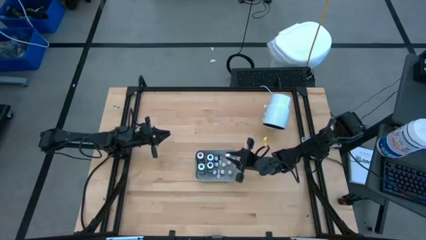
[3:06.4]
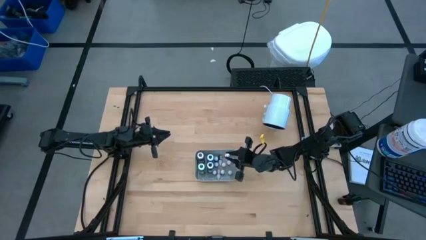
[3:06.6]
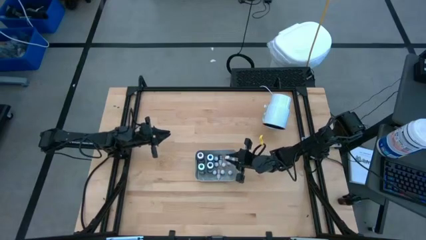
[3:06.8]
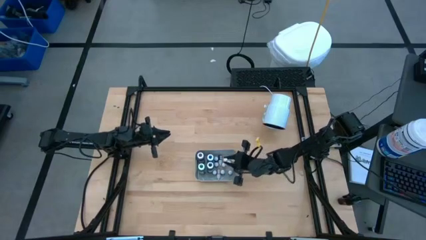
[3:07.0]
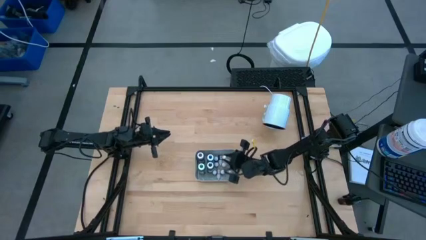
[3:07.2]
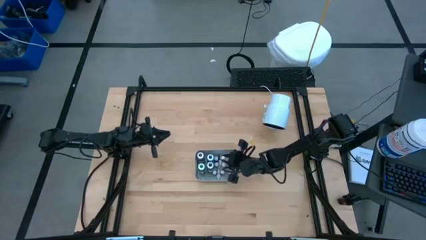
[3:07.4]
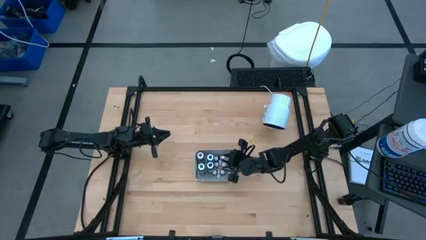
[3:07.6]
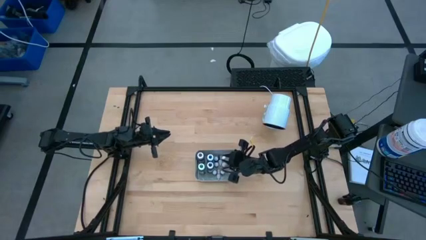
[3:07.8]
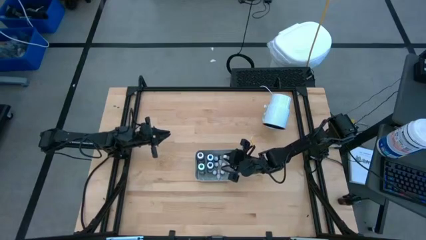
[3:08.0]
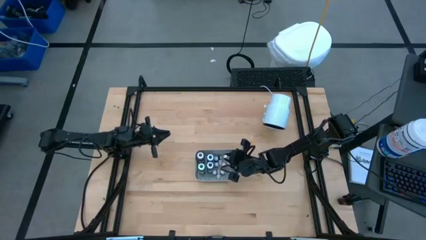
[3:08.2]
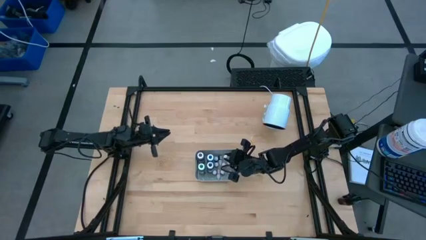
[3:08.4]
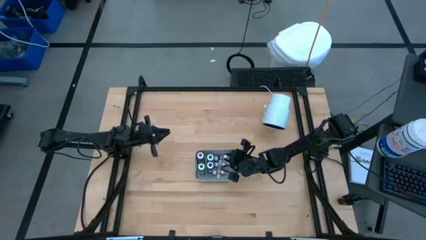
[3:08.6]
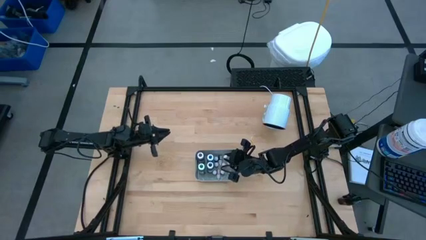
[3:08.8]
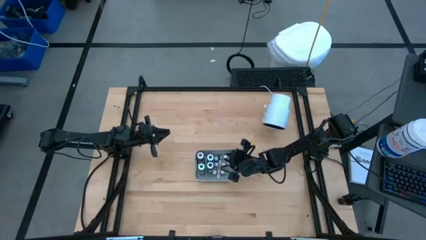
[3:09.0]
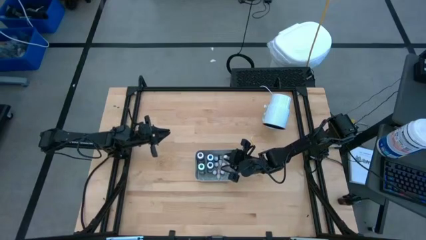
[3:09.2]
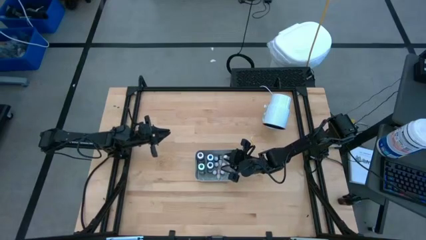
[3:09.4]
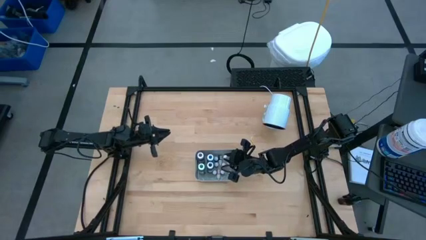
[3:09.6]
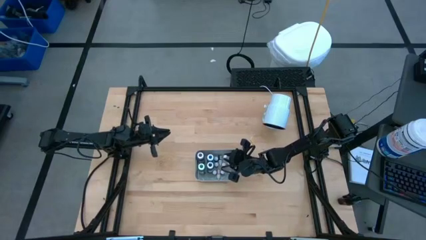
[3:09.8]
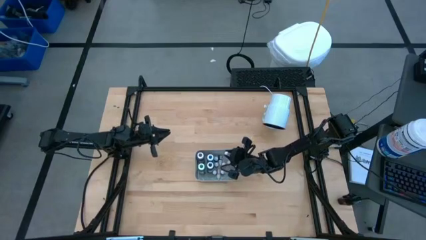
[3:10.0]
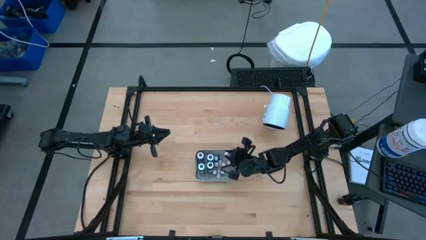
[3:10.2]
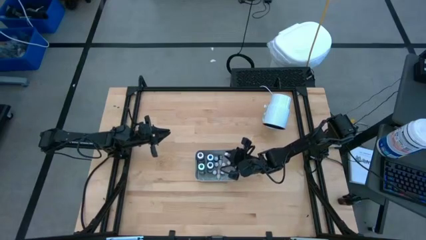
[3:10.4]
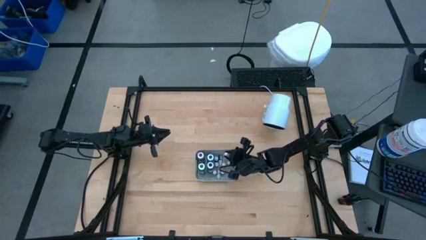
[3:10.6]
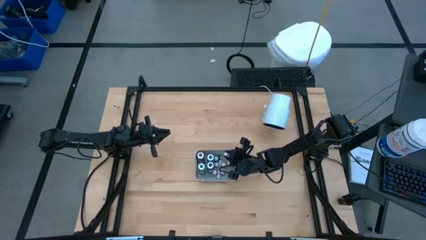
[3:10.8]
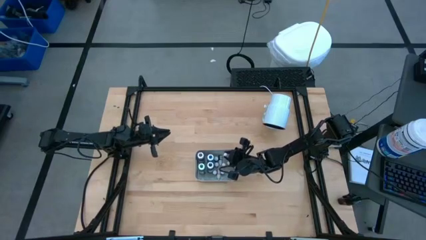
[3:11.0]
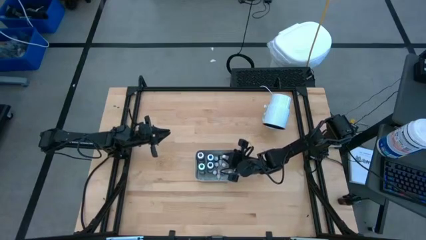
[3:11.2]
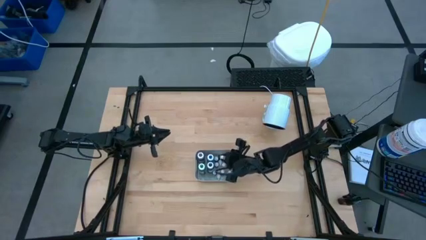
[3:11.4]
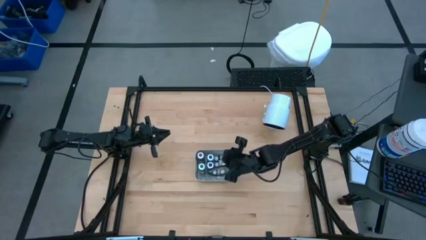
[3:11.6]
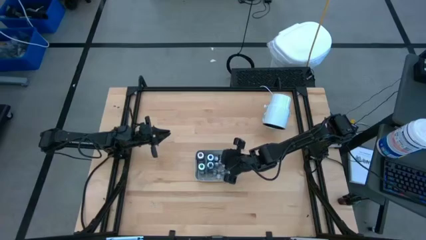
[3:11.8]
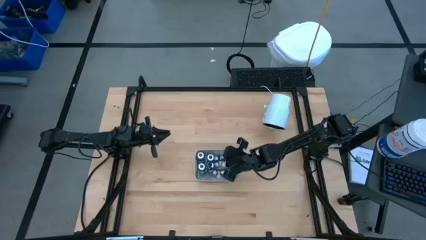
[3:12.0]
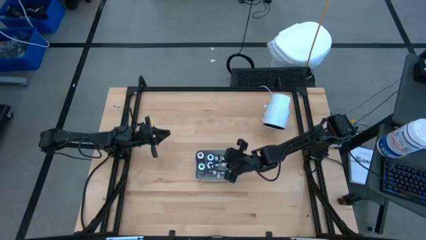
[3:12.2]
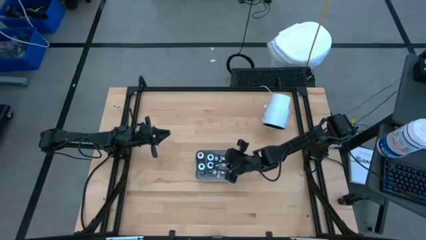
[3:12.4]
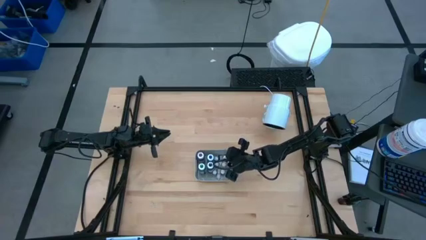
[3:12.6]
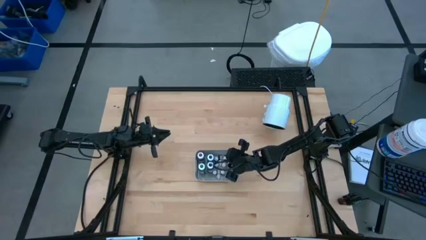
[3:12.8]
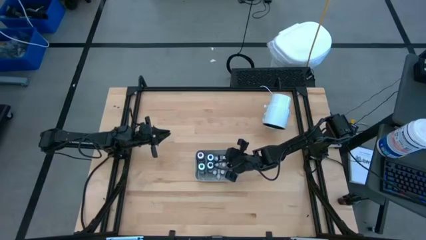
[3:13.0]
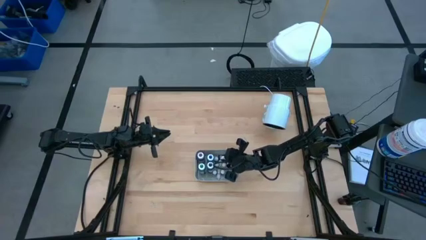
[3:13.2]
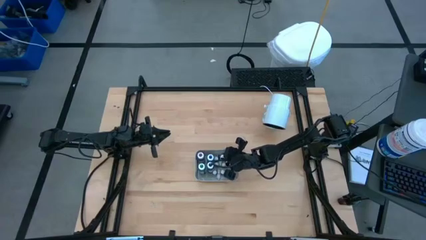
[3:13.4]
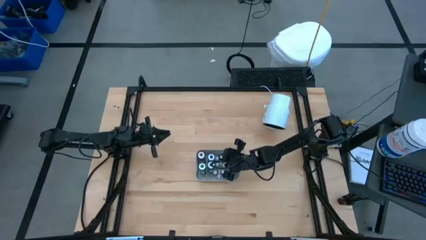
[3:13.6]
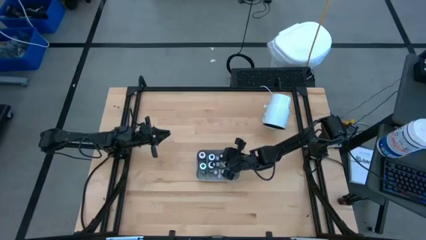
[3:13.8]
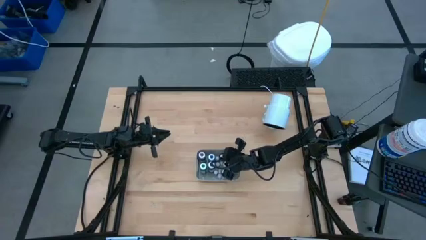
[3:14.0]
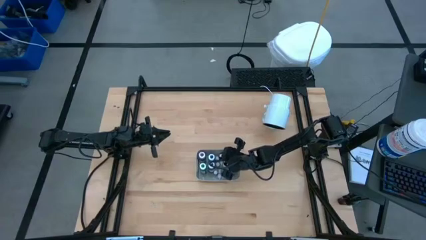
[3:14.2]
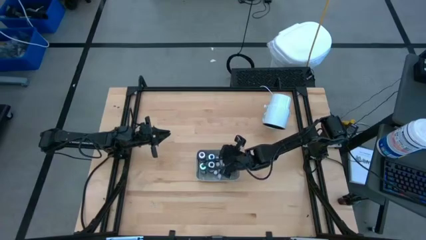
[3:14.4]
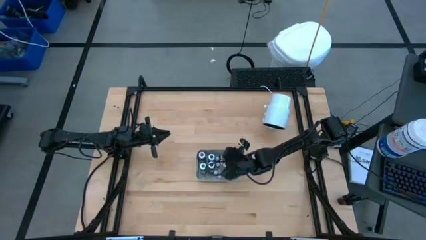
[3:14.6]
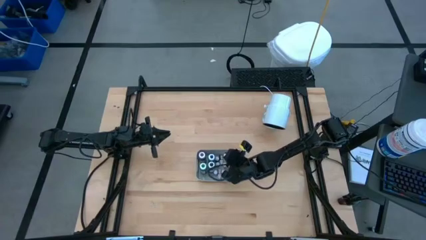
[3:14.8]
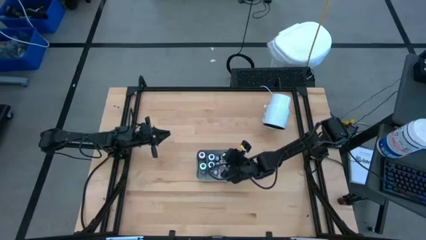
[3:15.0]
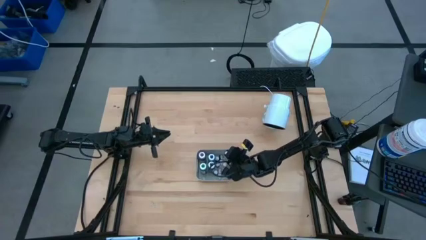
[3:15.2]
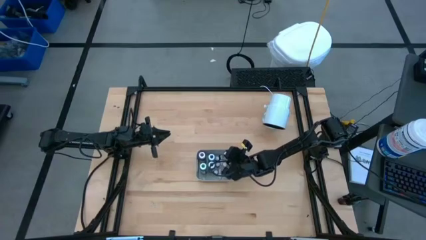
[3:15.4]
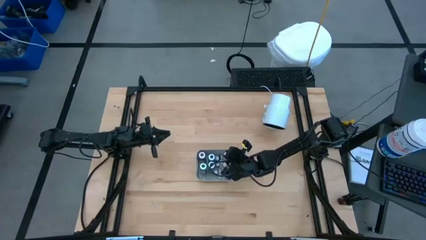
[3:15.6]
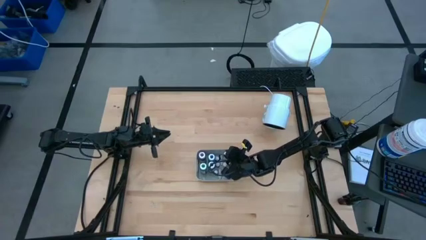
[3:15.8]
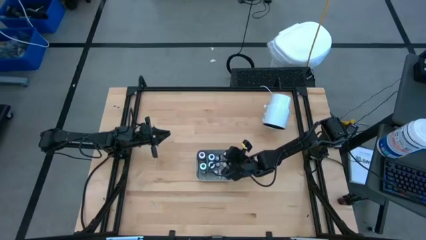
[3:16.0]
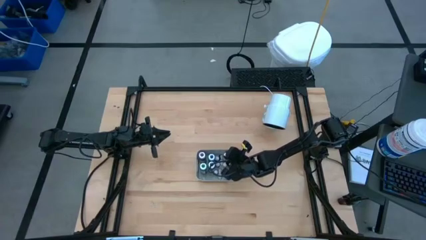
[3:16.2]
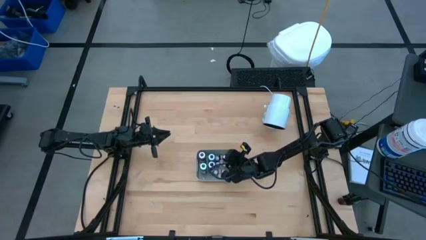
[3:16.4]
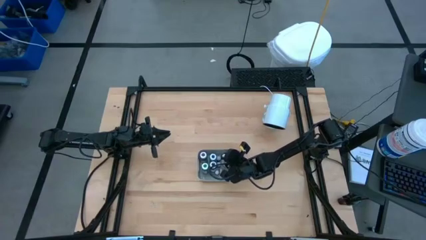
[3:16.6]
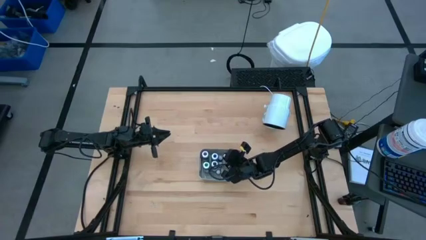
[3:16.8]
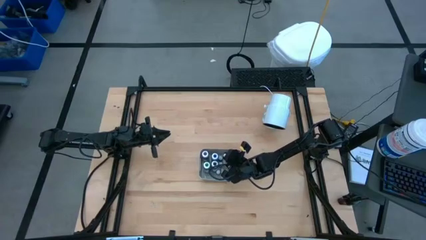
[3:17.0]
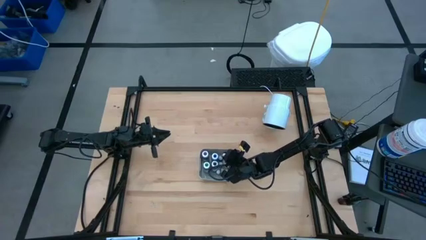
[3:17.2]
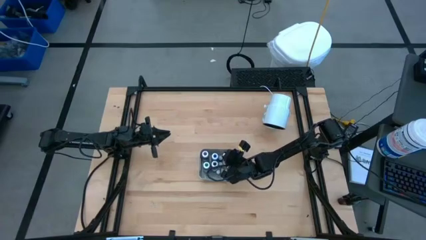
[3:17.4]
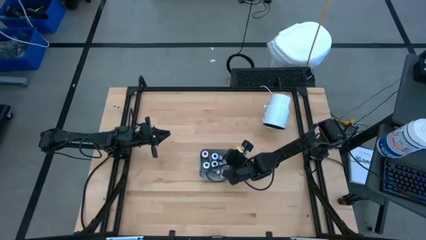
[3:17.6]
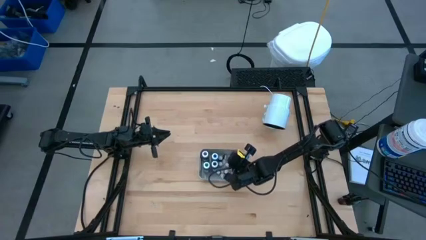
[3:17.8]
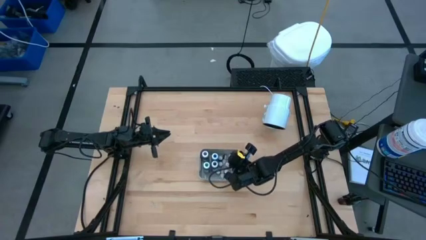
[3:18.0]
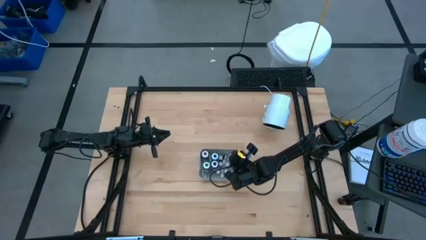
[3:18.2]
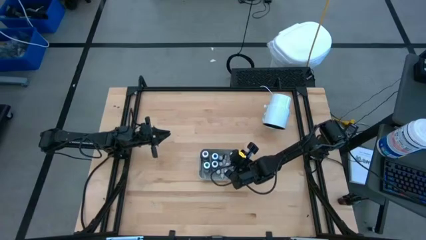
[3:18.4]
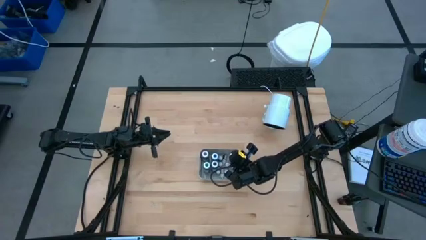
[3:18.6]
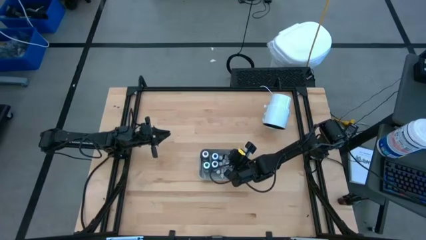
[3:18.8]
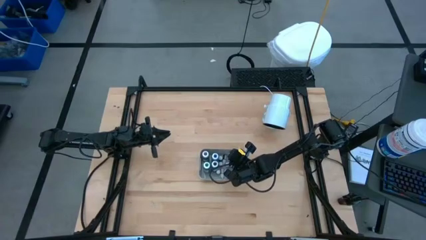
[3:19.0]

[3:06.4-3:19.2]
Task: Pick & Place food coloring
Put the small orange food coloring bottle into the gray bin

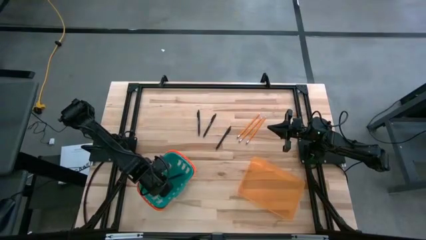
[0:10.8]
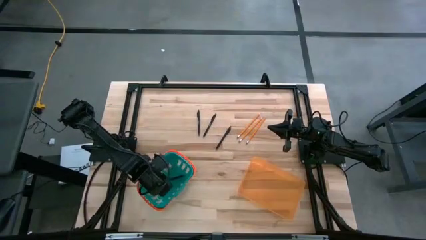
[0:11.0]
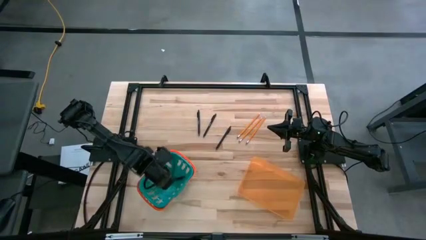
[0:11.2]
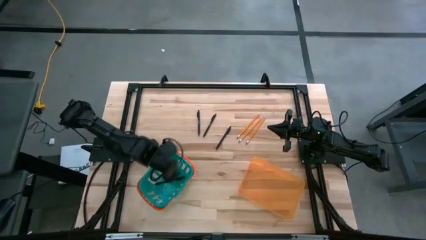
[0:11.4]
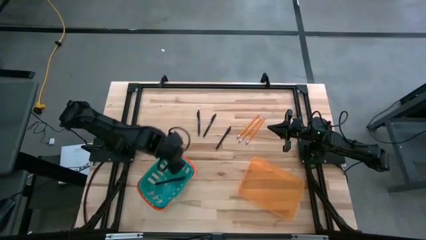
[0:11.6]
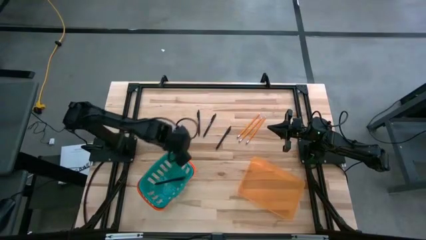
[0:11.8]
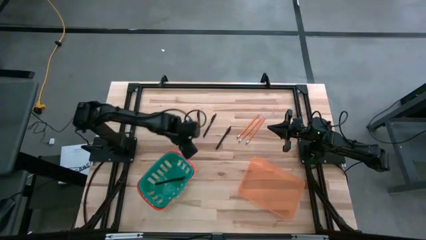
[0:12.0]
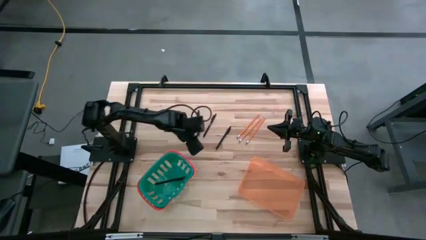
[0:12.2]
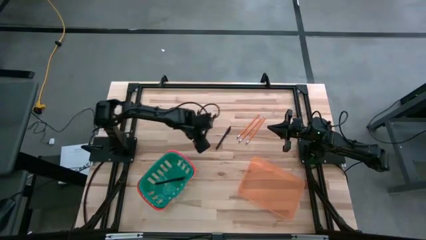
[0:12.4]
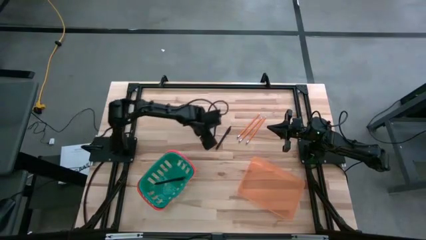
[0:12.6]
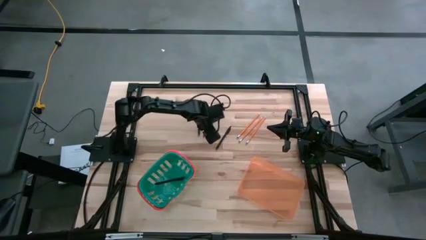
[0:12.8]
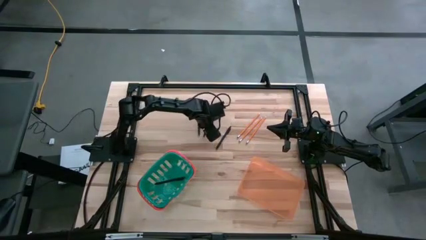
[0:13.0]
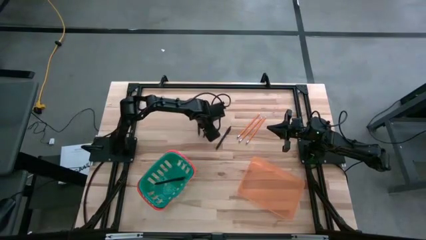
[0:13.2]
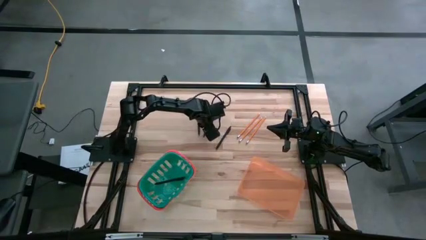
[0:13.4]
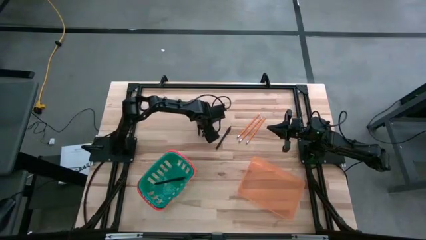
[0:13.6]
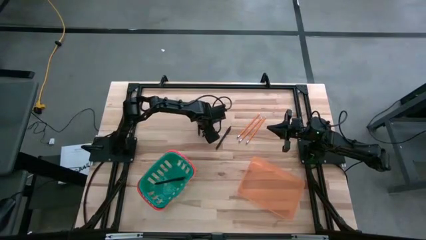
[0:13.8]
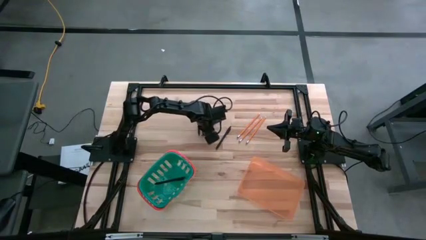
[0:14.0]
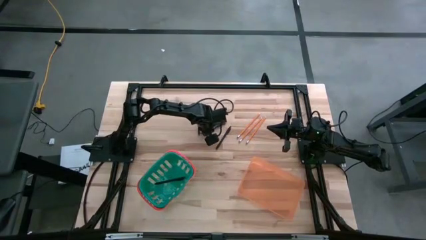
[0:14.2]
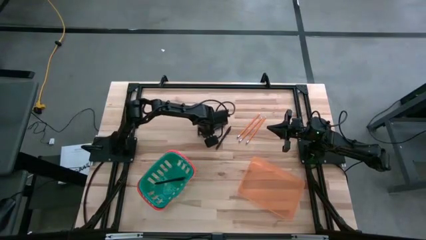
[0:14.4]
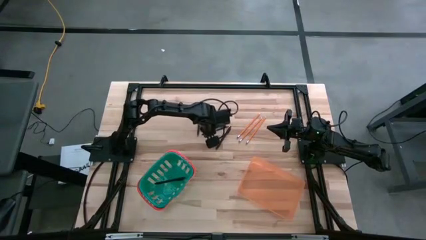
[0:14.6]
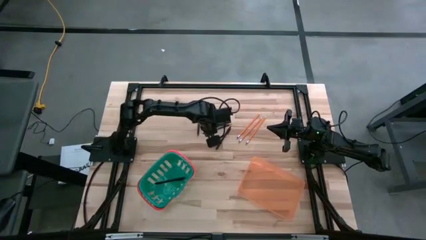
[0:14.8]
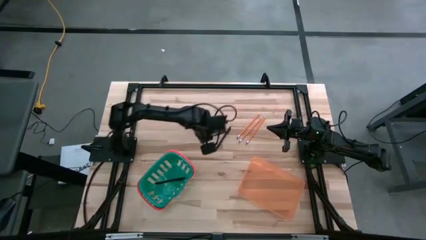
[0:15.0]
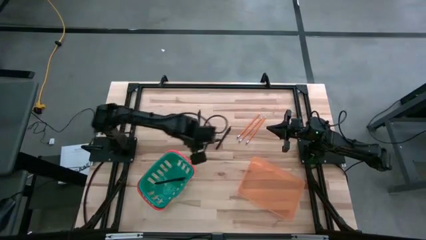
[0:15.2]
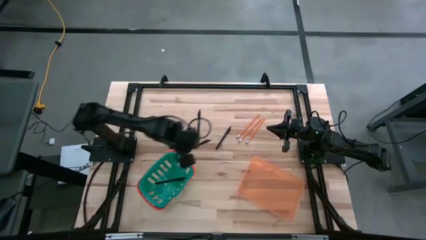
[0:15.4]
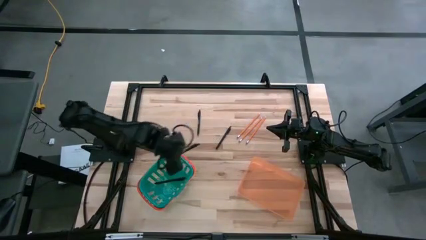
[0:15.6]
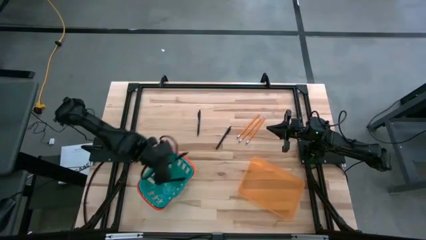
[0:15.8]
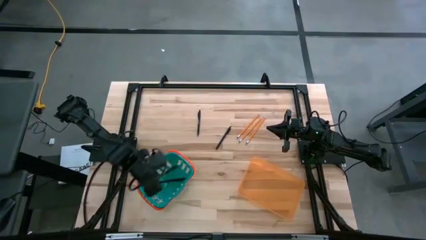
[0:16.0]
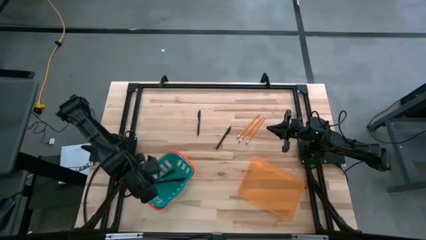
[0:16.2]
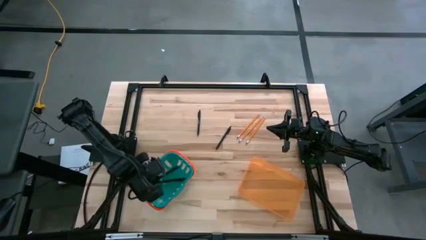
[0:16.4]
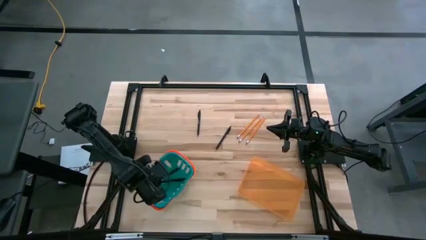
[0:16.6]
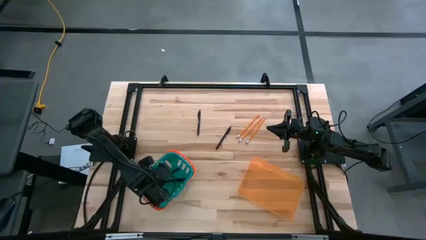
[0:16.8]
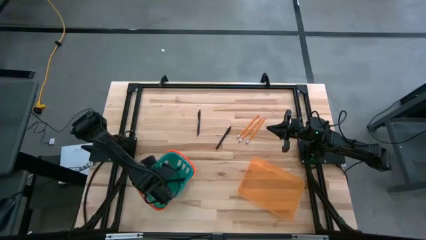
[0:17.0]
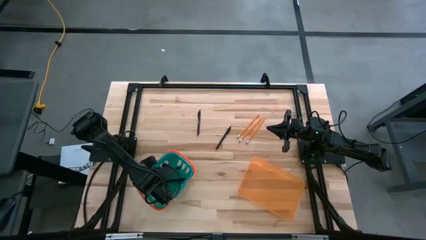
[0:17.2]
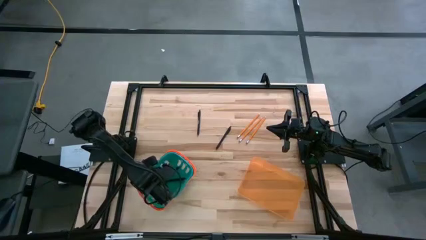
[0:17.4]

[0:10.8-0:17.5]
Task: Sort pens & pencils
Put the middle black ballpen into the blue bin
